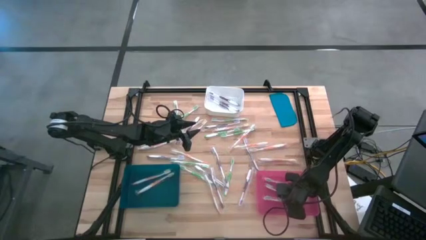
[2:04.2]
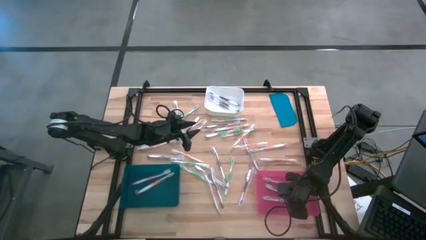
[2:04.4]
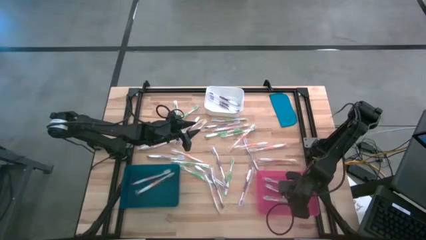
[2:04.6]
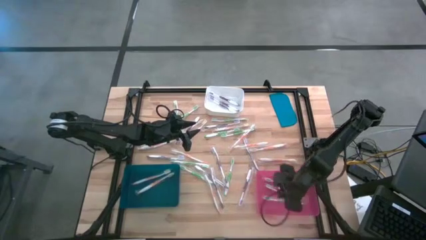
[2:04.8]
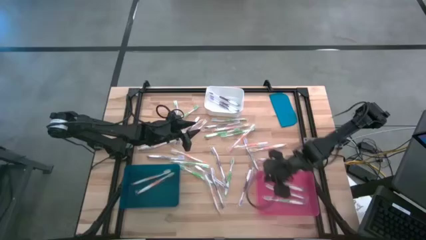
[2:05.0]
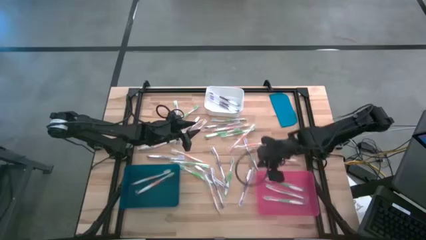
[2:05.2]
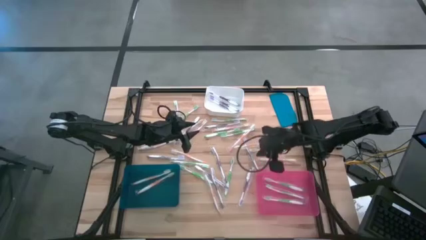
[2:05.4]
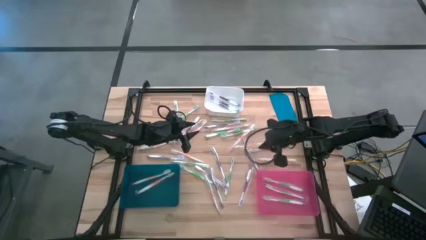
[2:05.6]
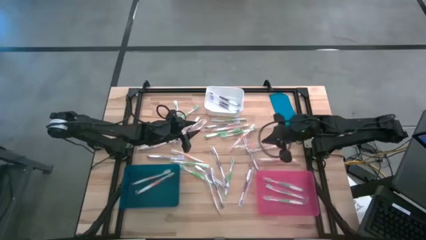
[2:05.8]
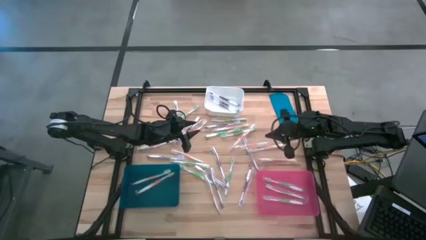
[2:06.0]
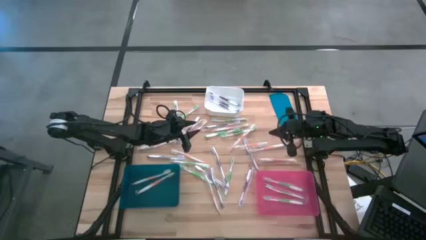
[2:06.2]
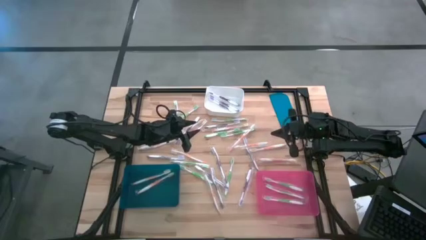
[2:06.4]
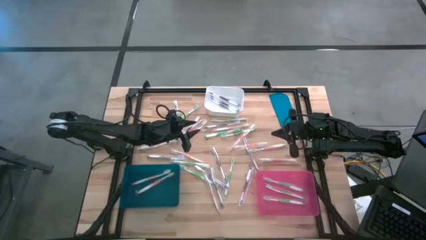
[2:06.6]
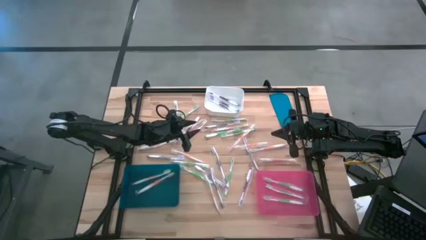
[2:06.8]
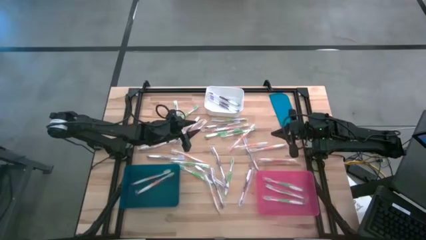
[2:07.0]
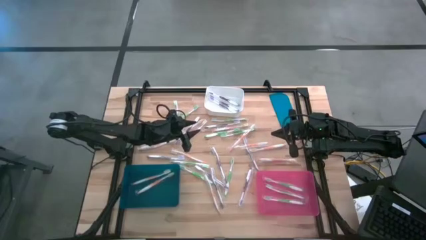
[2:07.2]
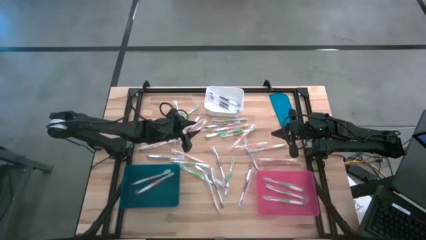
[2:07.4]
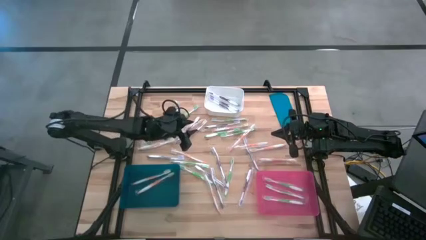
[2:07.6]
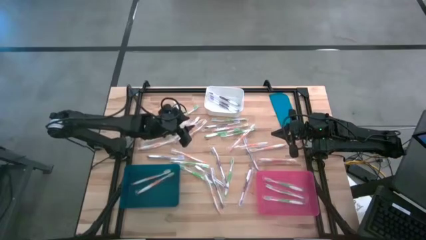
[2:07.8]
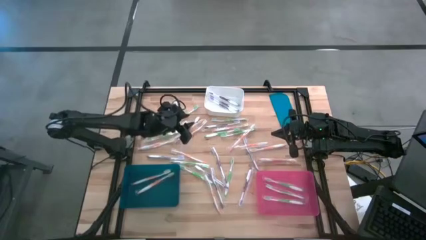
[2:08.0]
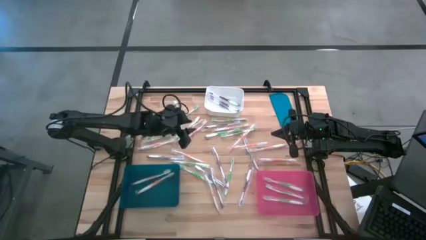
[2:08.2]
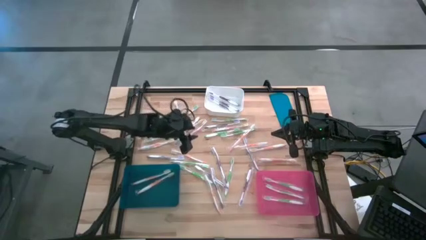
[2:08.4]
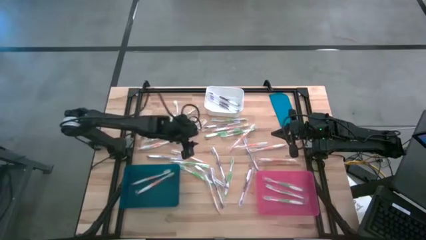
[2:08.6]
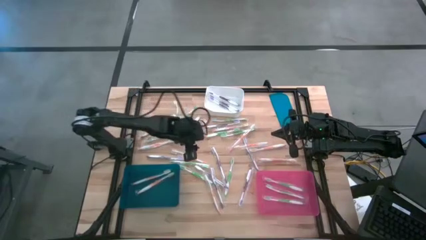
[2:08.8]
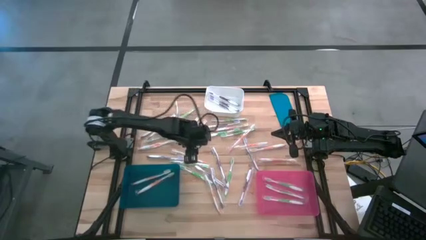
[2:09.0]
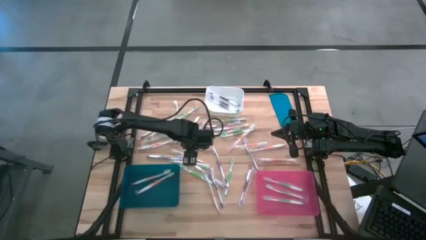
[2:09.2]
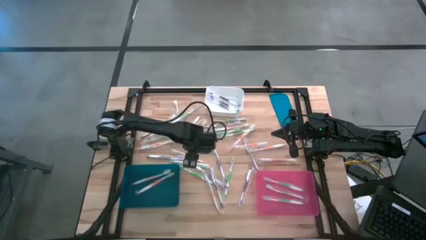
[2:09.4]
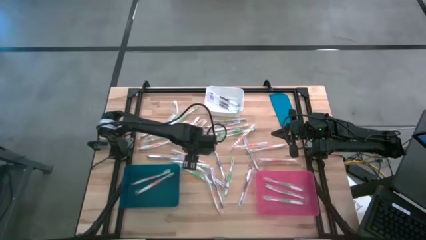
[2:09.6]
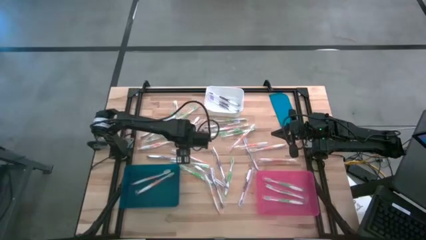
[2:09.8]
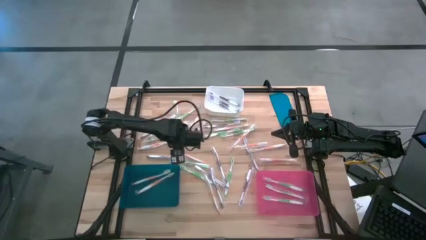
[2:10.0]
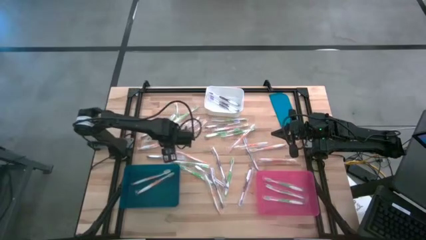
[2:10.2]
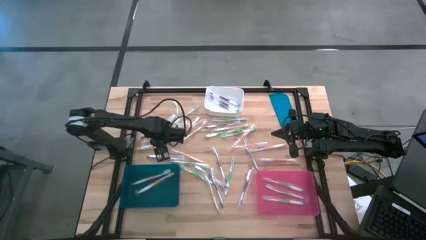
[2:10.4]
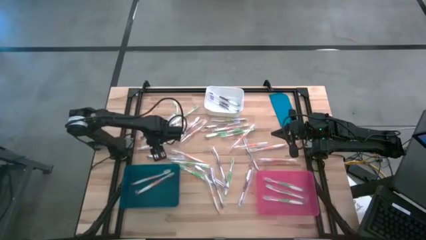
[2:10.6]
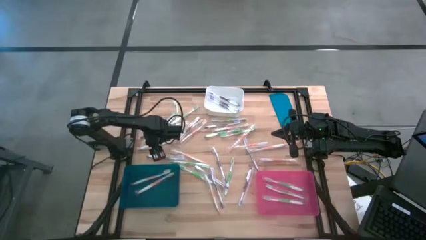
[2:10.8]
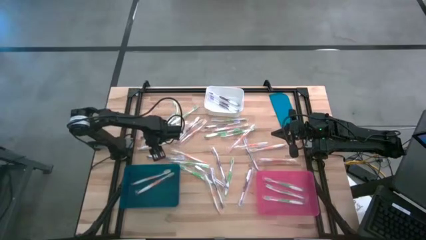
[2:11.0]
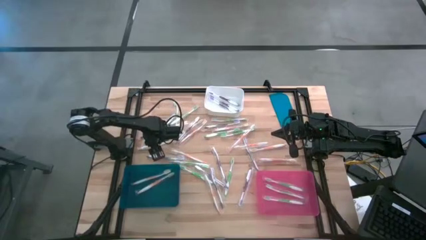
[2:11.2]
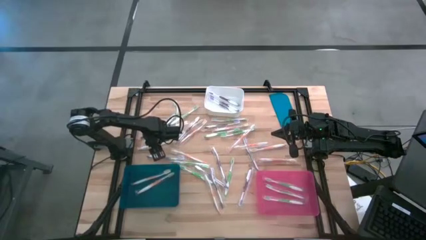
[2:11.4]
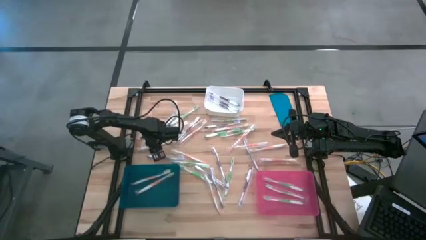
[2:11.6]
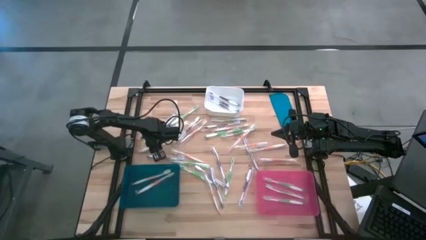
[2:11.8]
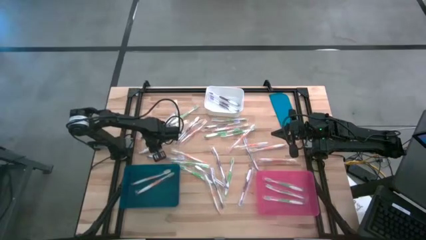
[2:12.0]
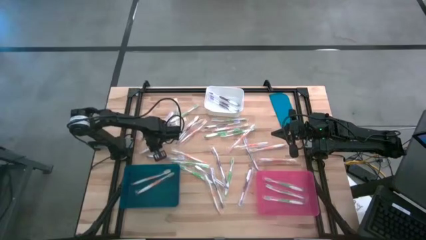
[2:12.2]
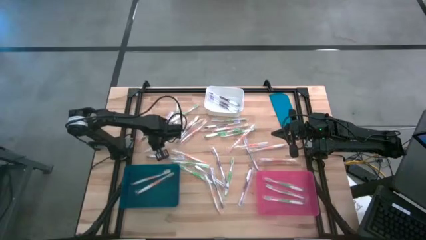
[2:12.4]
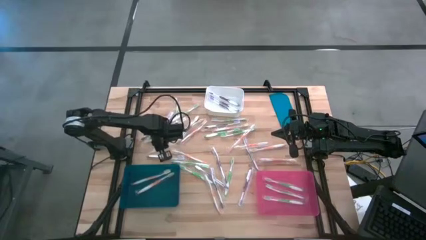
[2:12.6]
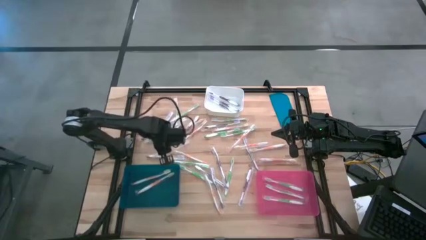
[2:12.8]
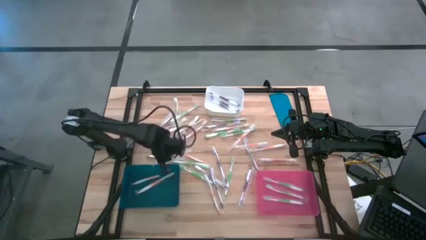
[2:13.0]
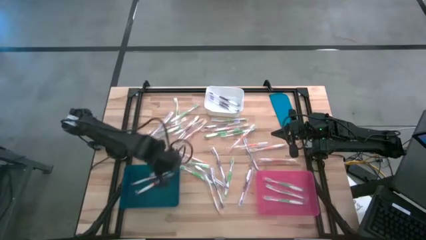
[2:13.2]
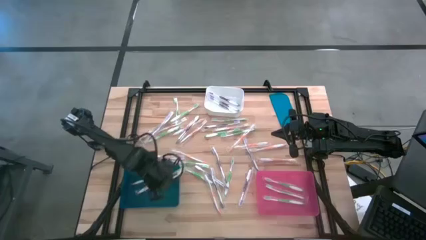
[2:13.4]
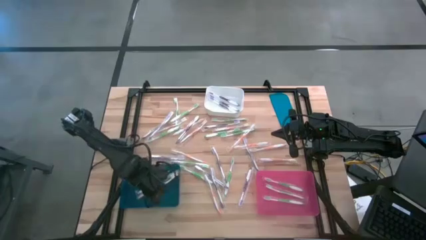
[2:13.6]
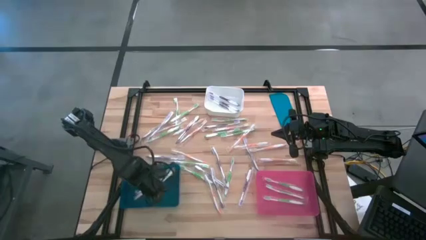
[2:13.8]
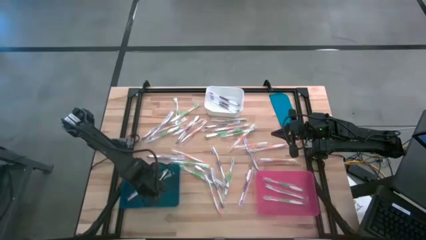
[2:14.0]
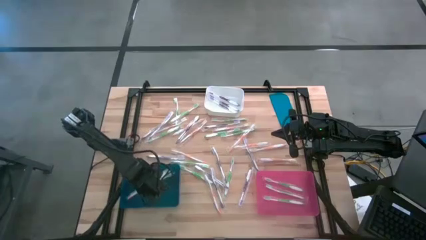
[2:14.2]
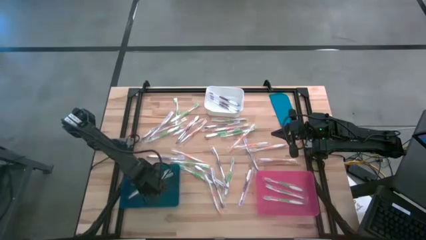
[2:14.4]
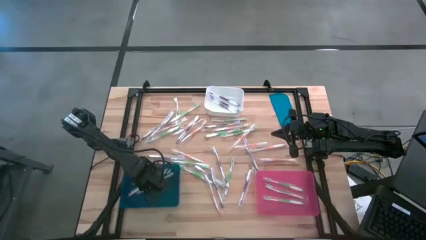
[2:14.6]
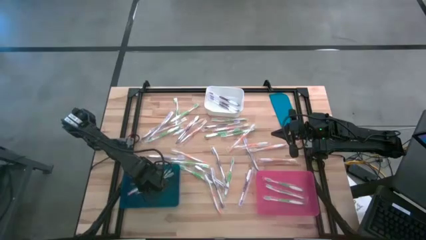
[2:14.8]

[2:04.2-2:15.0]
Task: Pick & Place Toothbrushes
Put the orange toothbrush into the blue bin
